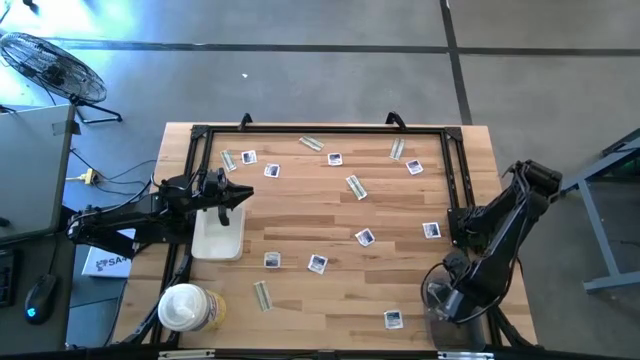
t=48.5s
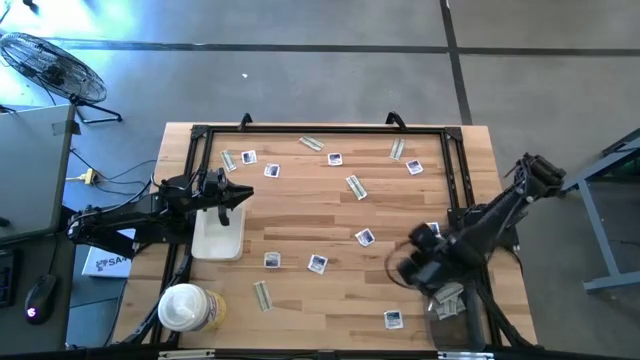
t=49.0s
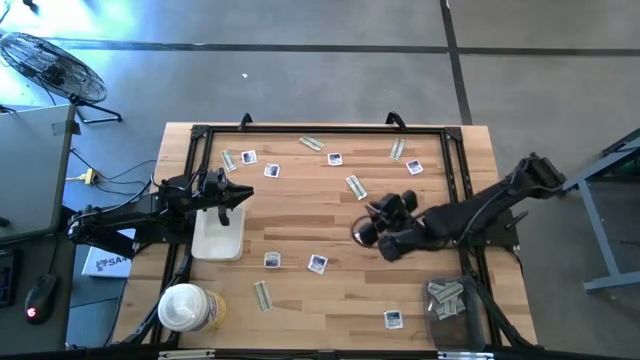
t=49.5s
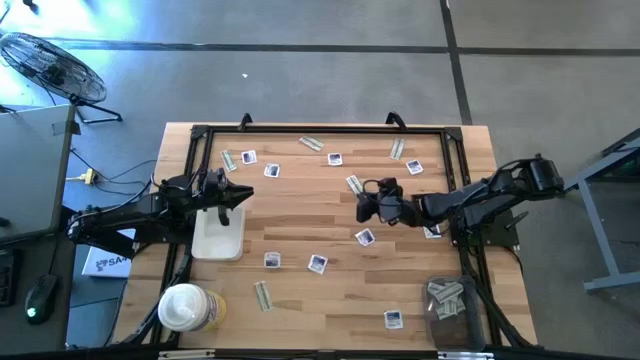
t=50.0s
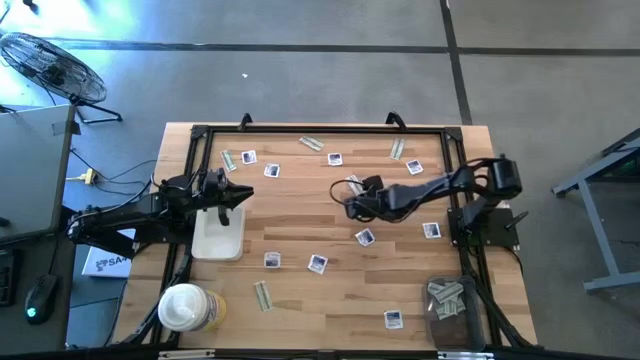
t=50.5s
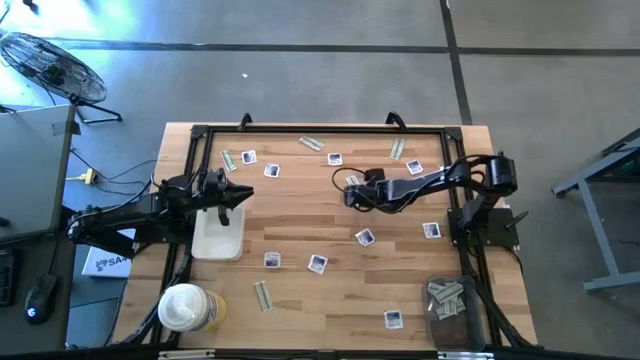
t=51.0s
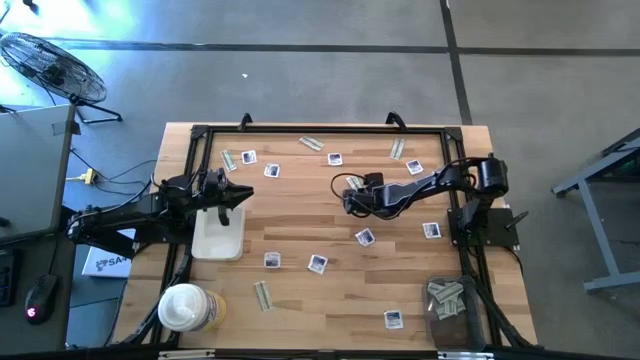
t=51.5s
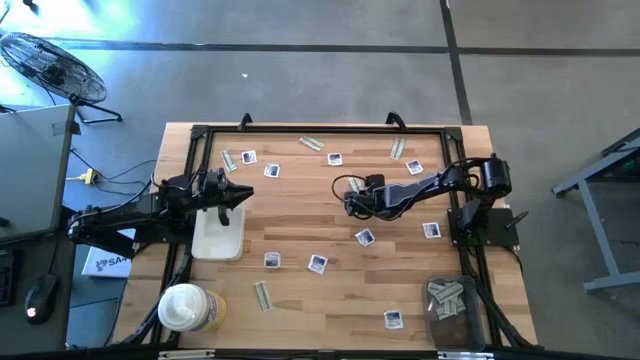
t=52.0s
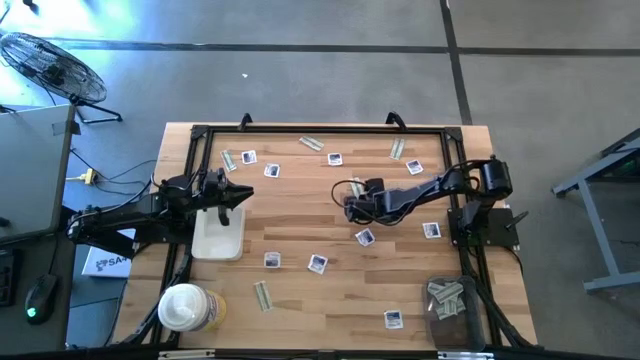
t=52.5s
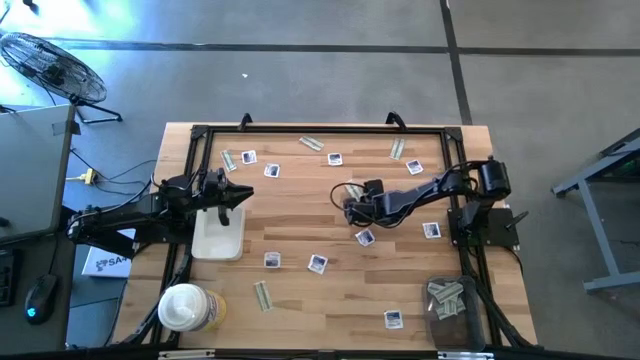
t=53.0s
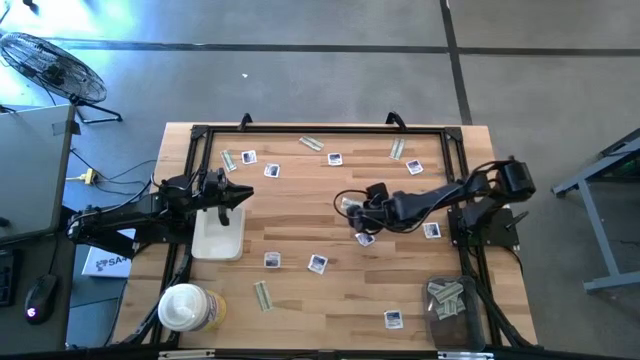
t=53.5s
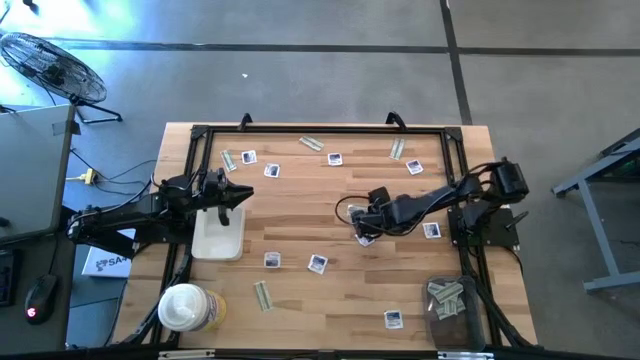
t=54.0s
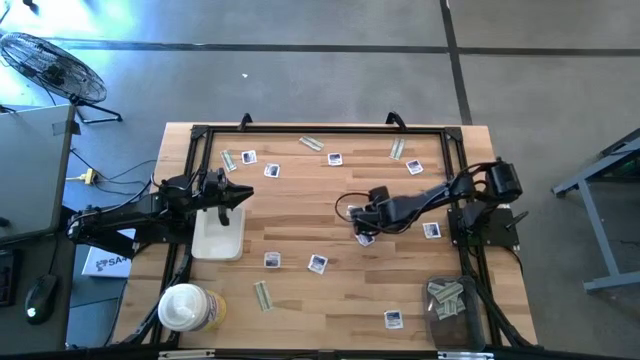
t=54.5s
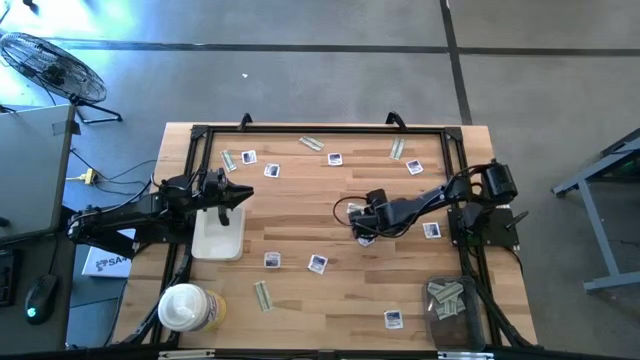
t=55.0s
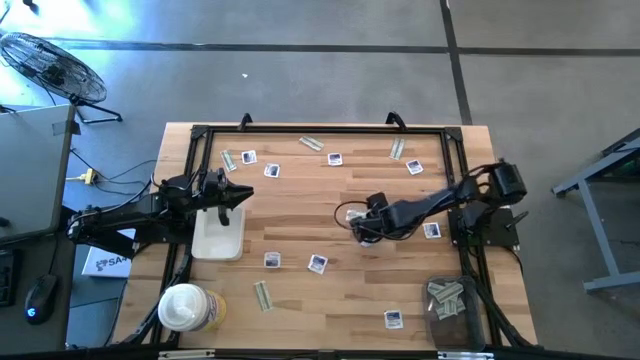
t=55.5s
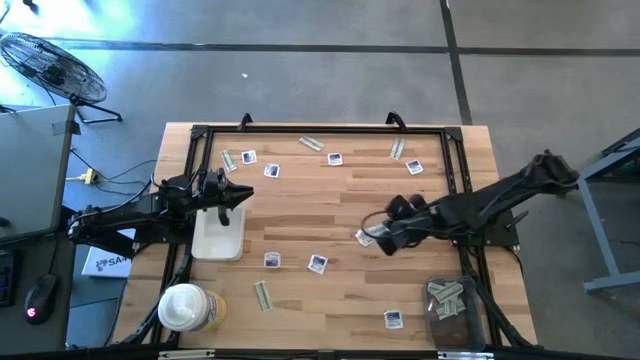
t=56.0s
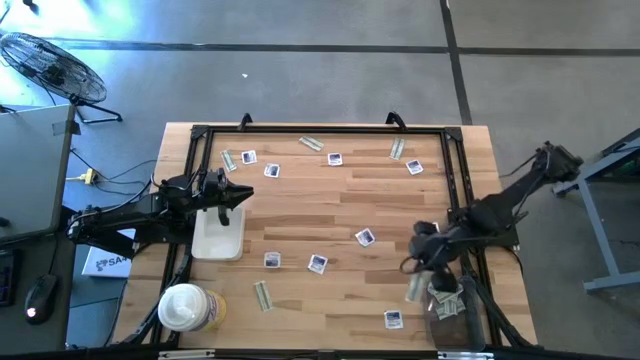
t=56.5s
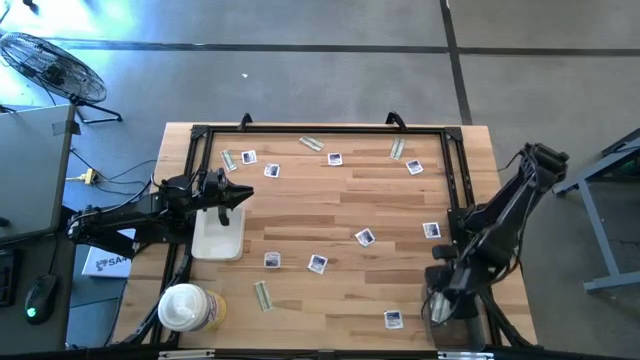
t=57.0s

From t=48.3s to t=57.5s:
Task: Pick & Place First Aid Supplies
Put the green bandage pack into the black bin

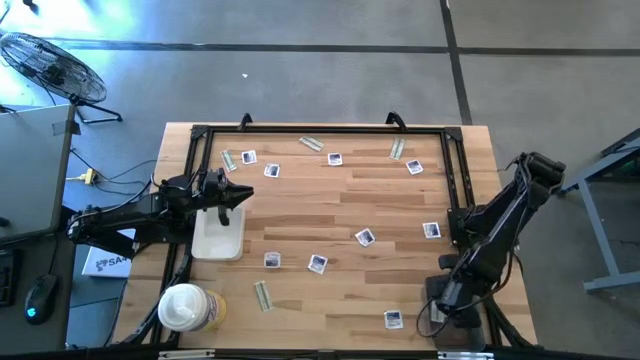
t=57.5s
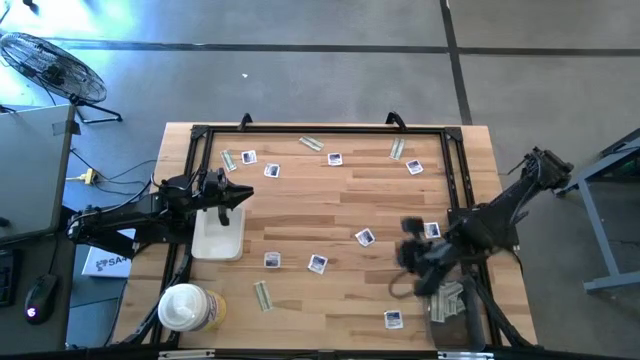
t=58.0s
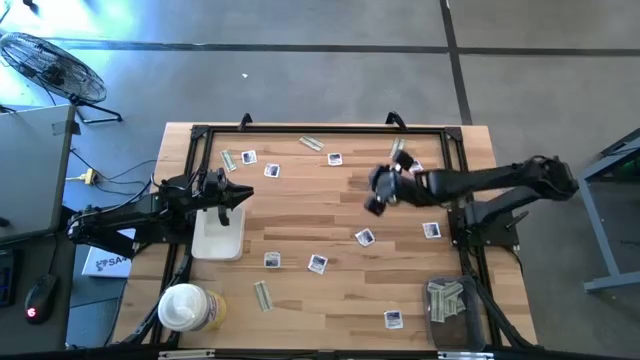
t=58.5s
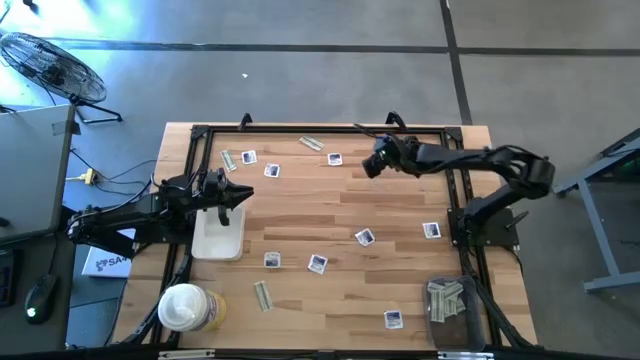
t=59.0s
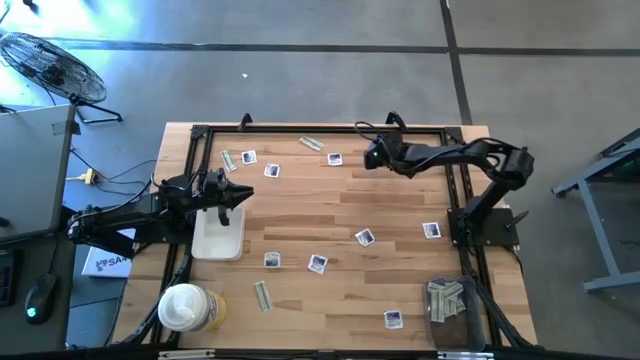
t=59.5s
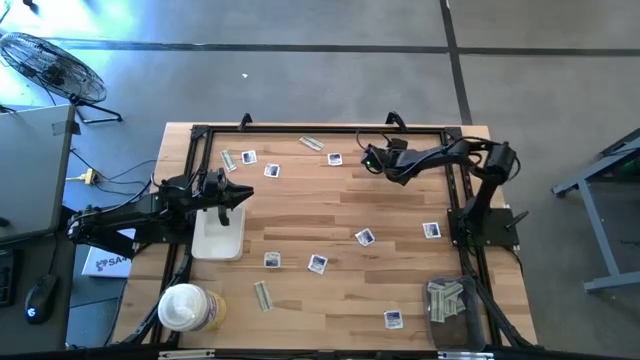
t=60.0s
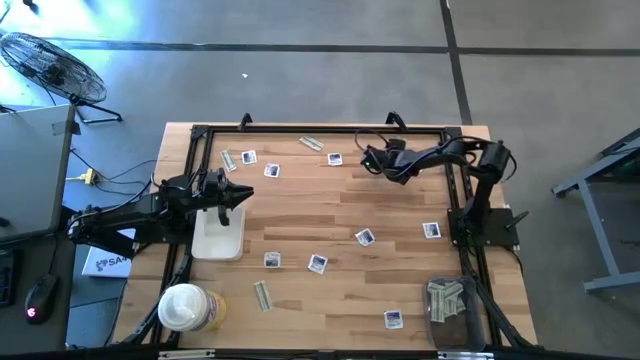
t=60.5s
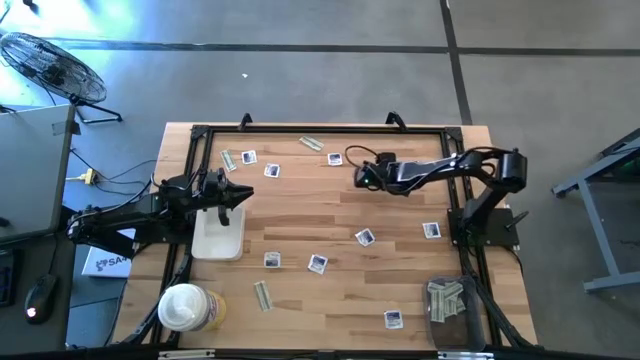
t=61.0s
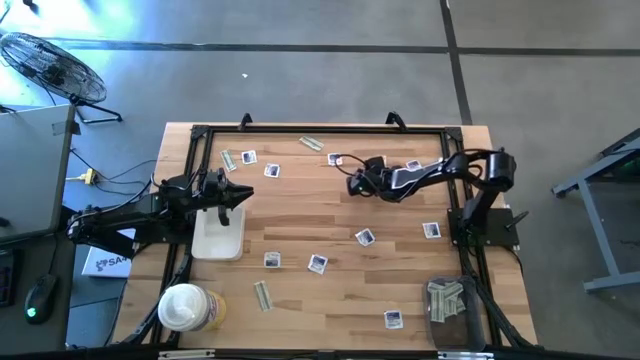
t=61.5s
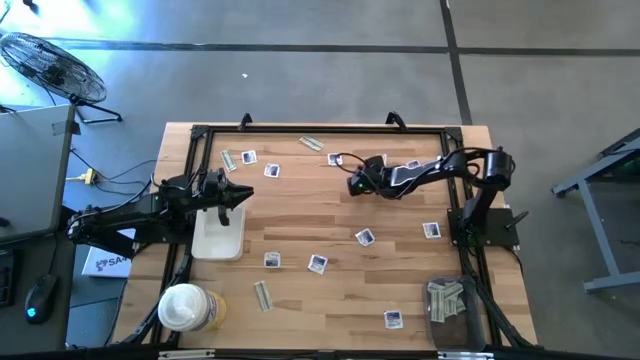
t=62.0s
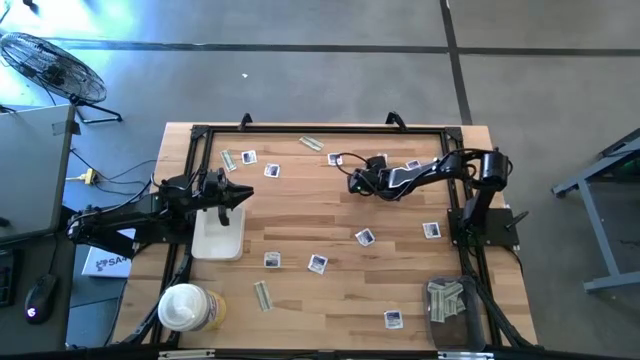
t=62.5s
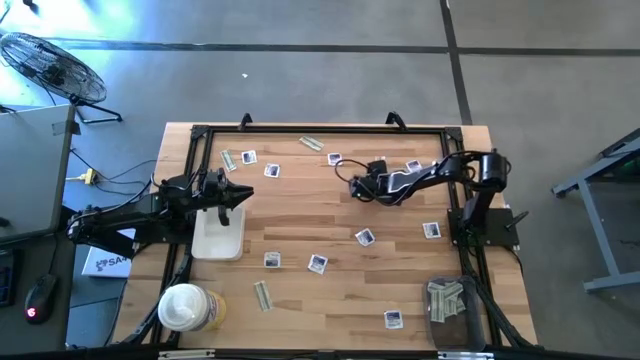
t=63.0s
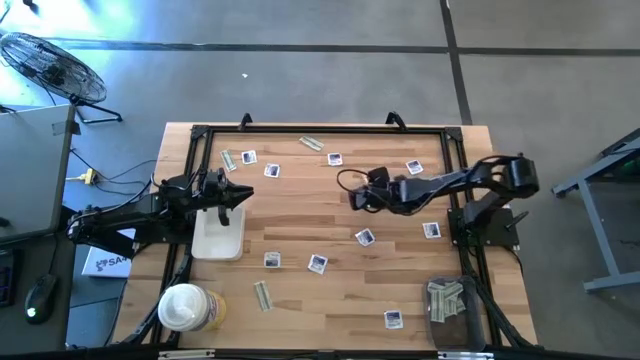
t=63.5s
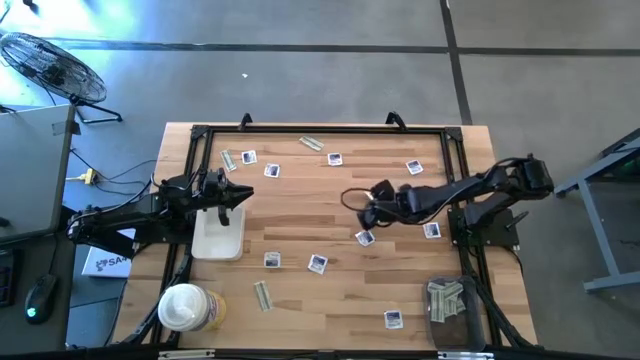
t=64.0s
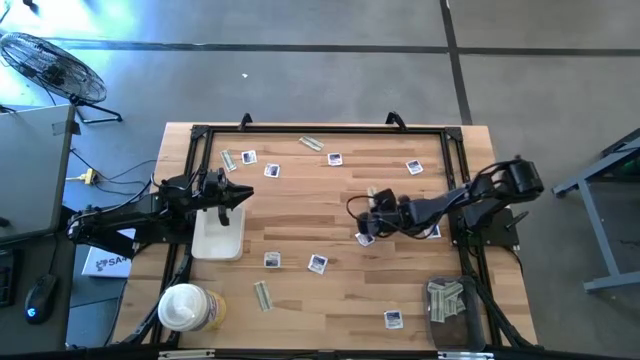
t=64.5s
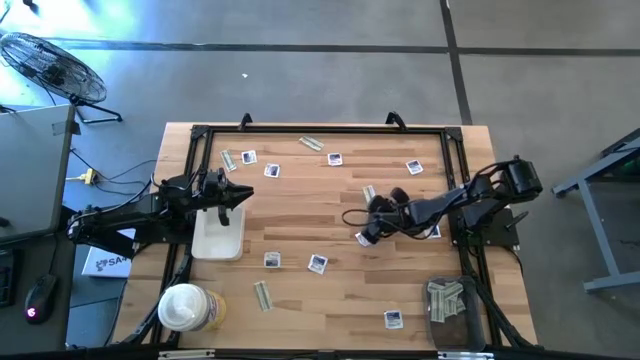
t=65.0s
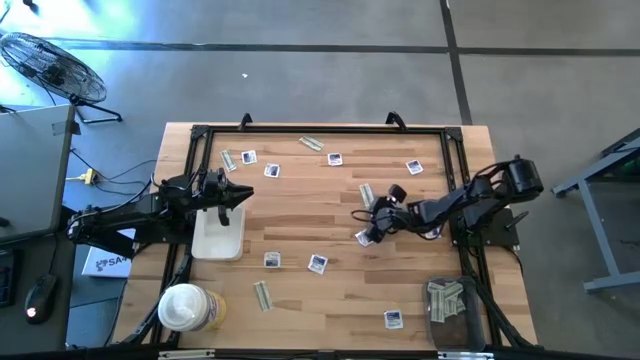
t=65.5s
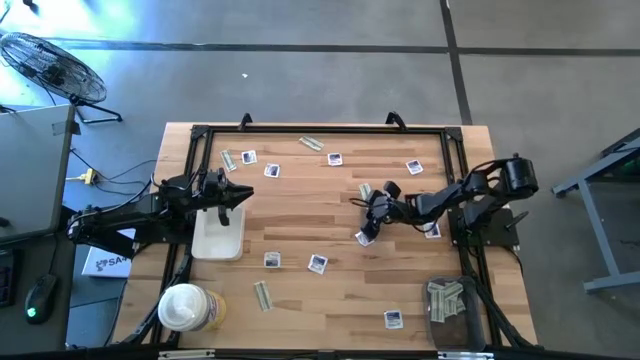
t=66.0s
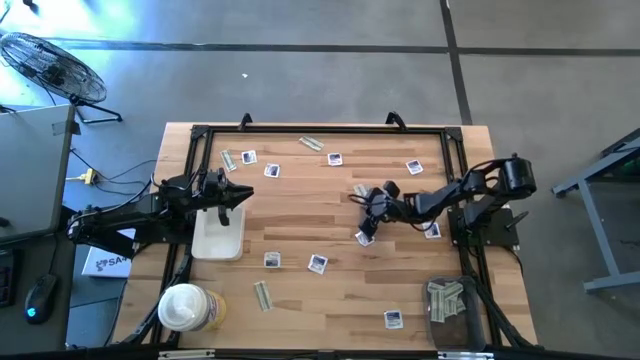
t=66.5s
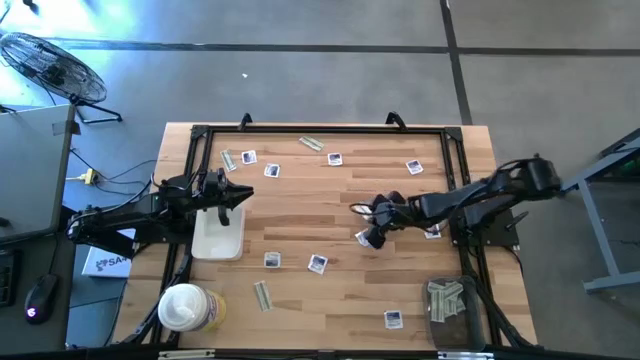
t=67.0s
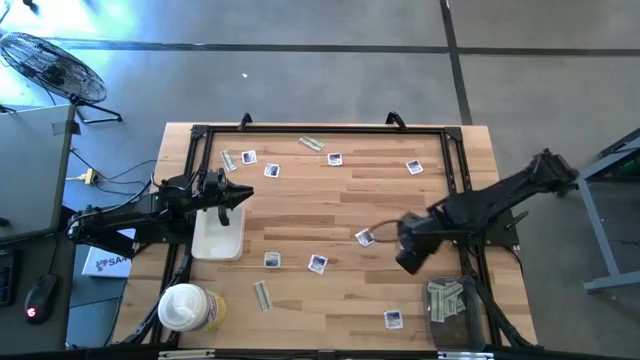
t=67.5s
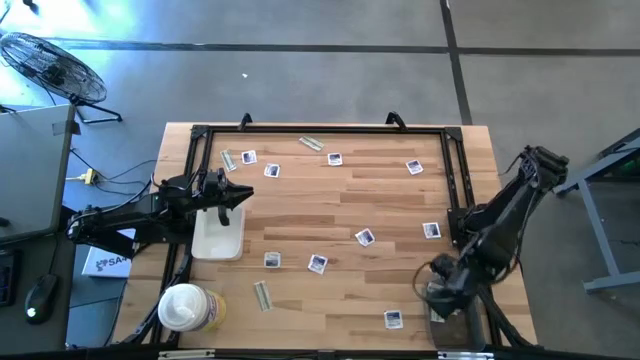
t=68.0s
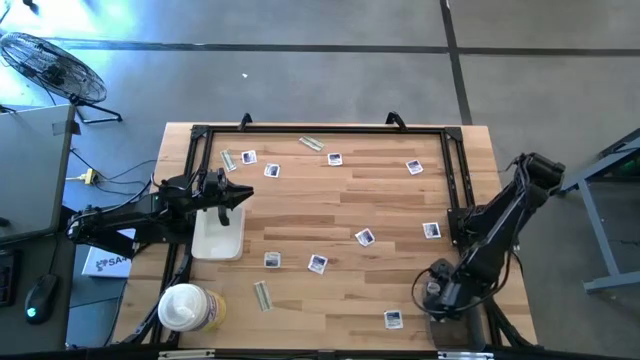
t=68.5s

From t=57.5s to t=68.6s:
Put the green bandage pack into the black bin
